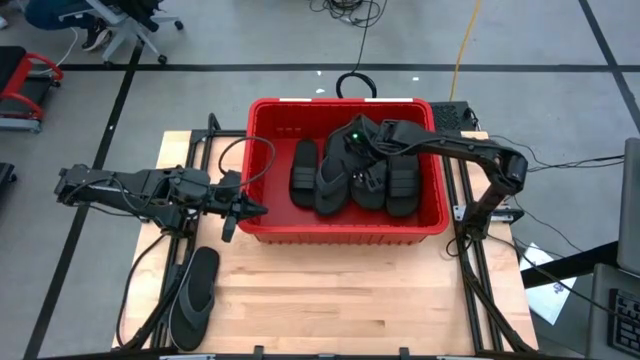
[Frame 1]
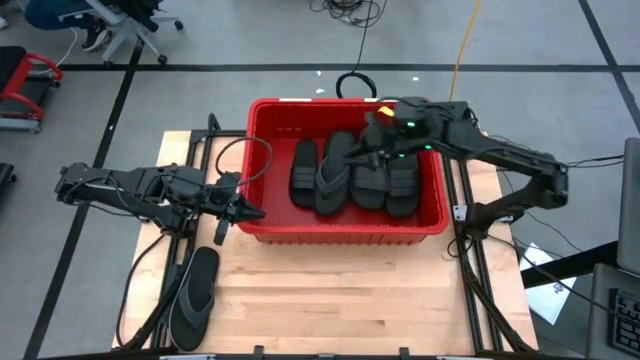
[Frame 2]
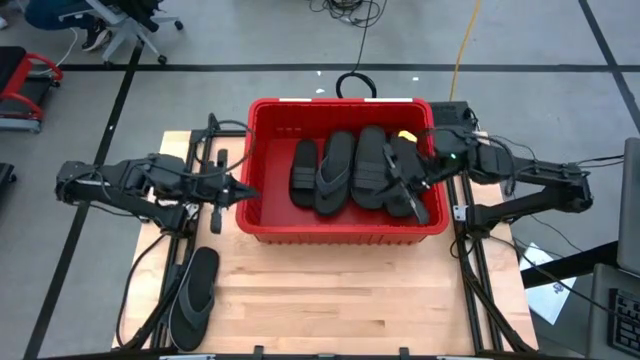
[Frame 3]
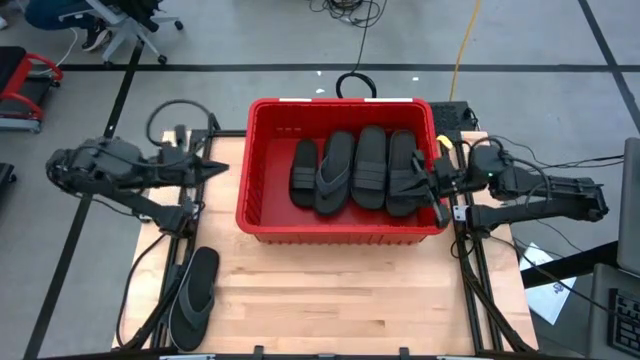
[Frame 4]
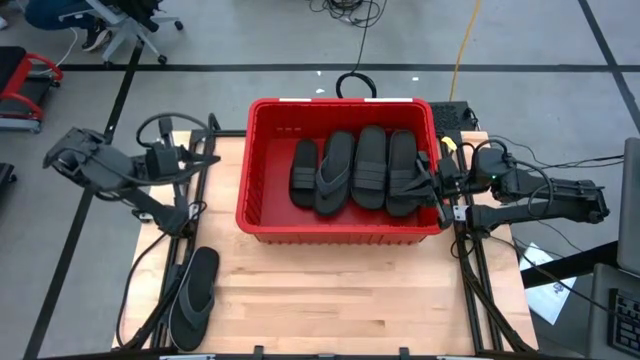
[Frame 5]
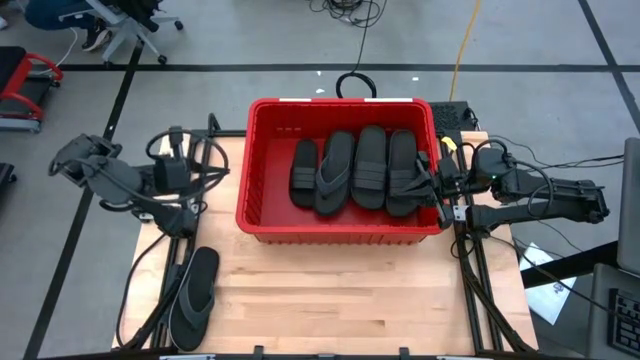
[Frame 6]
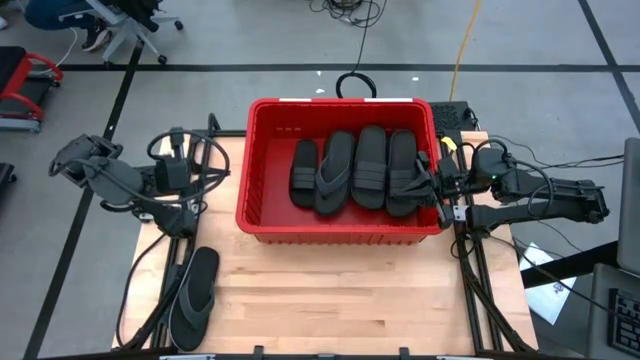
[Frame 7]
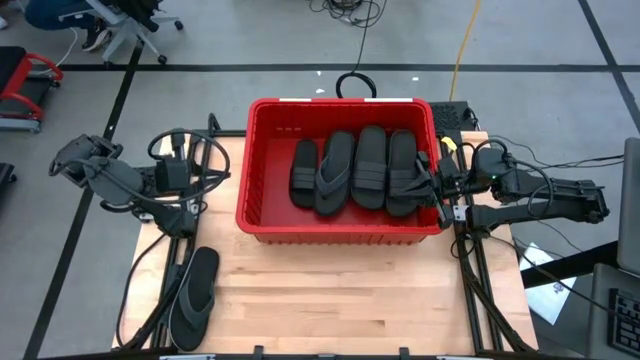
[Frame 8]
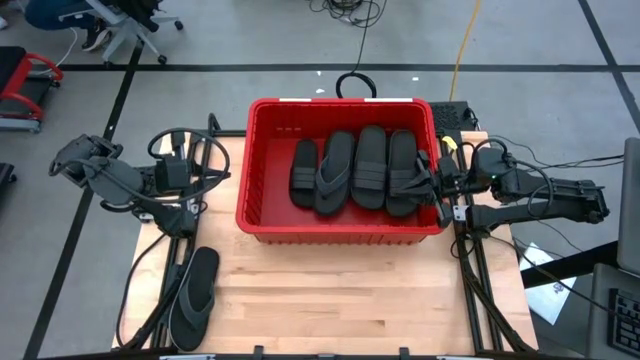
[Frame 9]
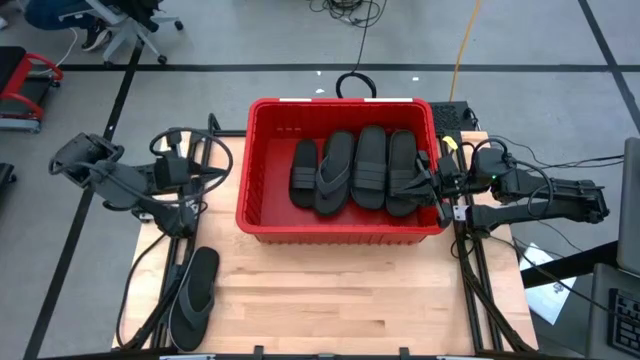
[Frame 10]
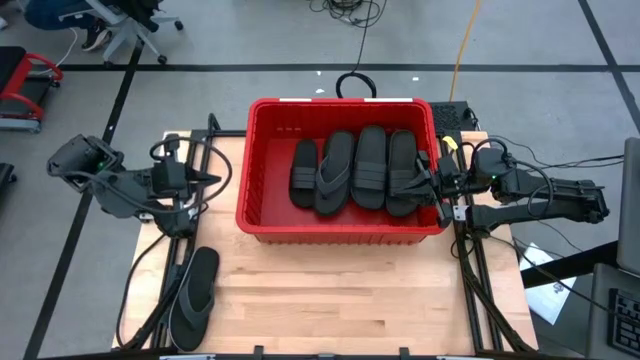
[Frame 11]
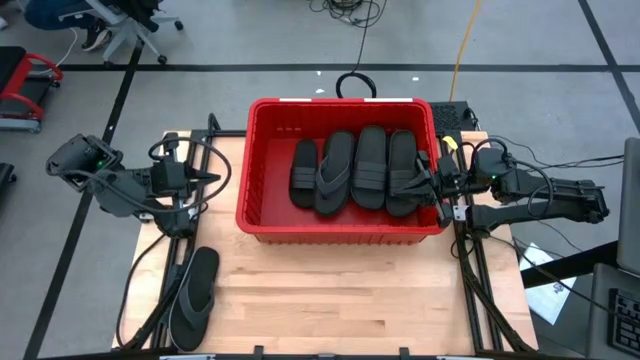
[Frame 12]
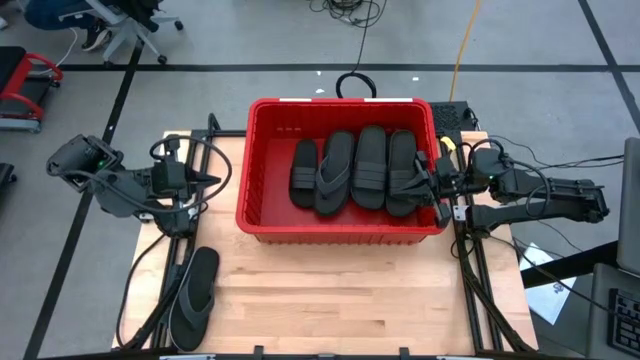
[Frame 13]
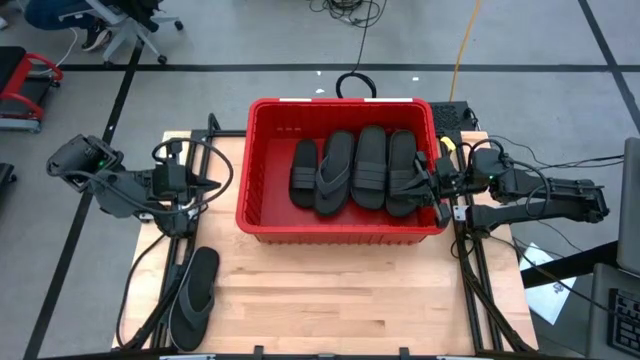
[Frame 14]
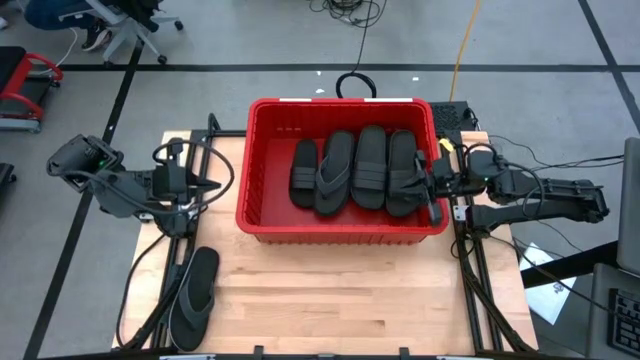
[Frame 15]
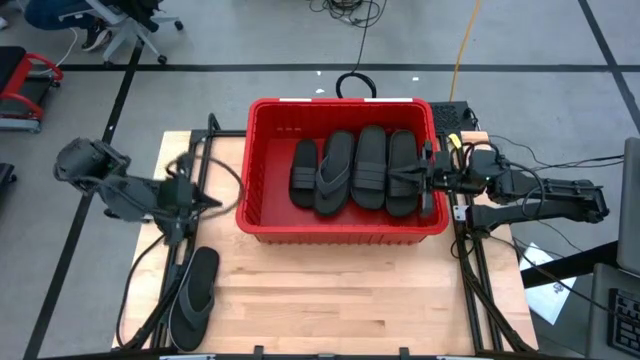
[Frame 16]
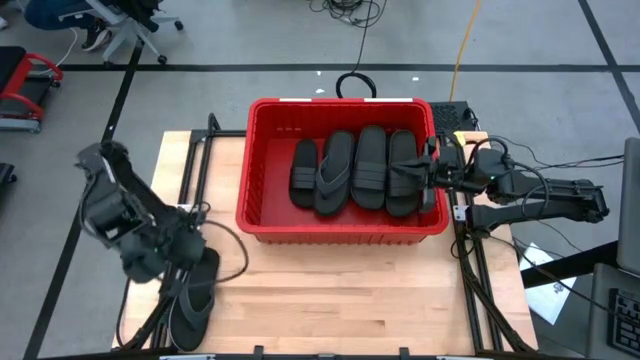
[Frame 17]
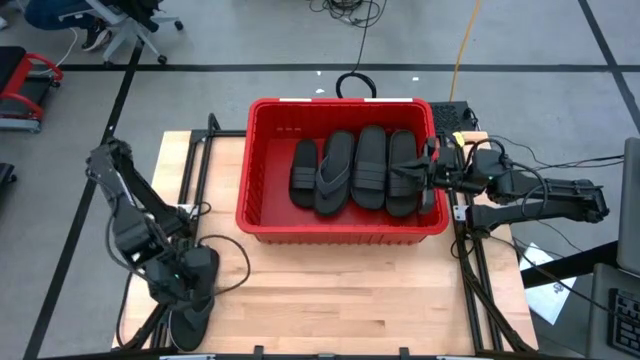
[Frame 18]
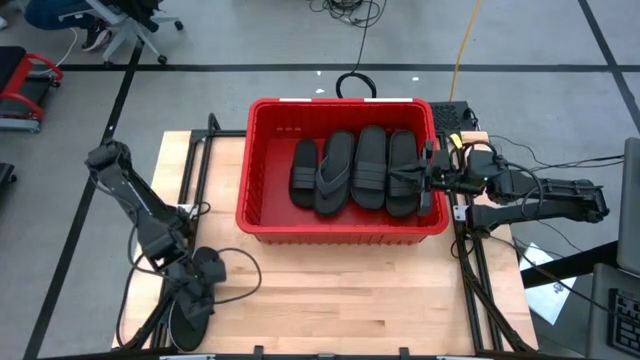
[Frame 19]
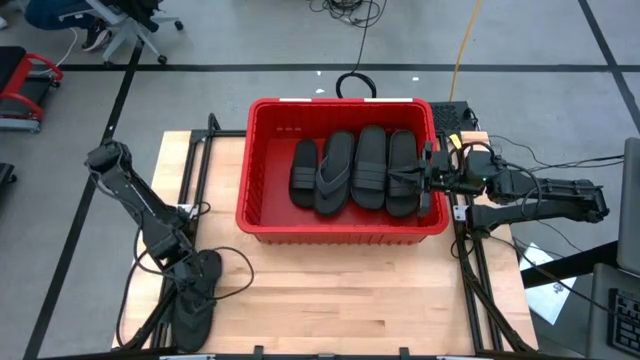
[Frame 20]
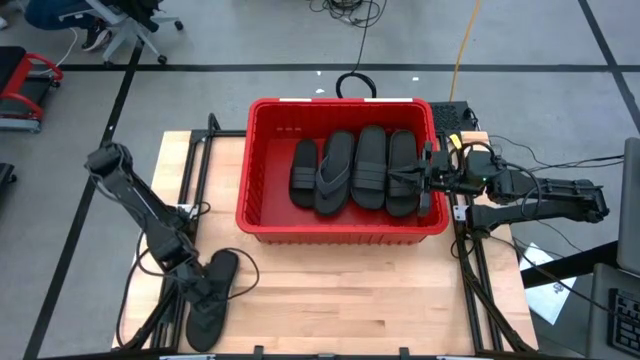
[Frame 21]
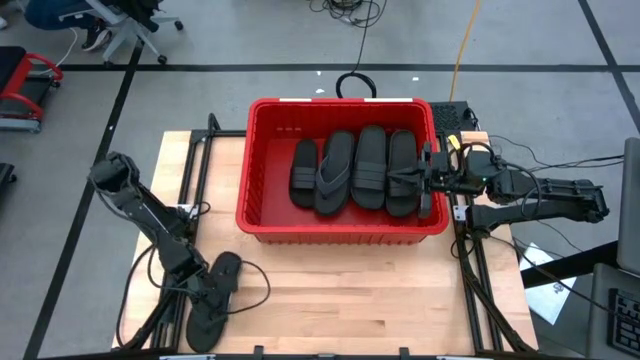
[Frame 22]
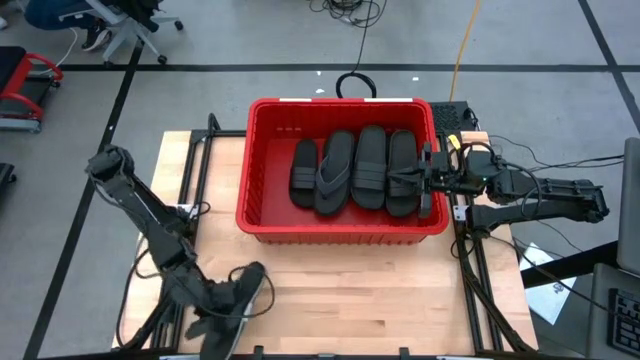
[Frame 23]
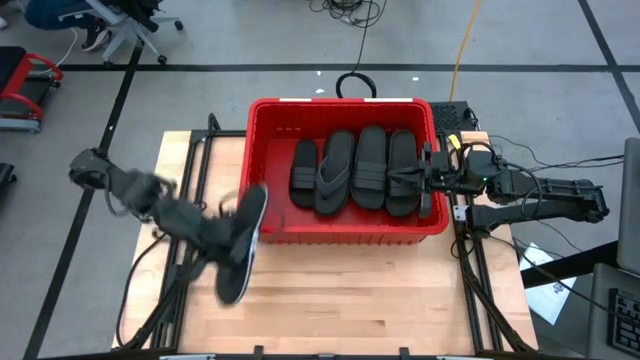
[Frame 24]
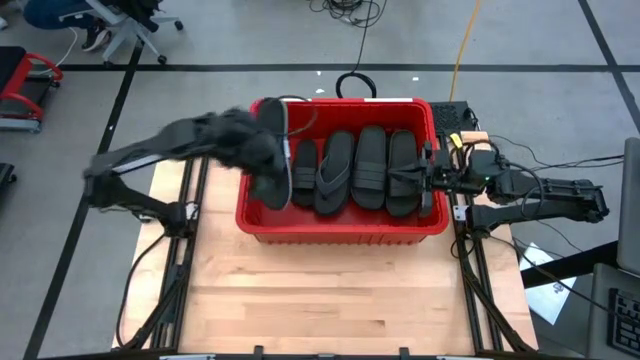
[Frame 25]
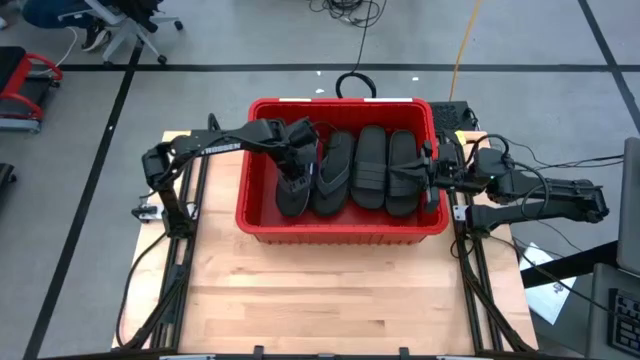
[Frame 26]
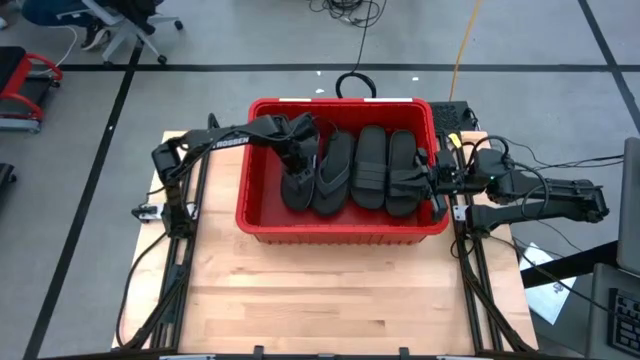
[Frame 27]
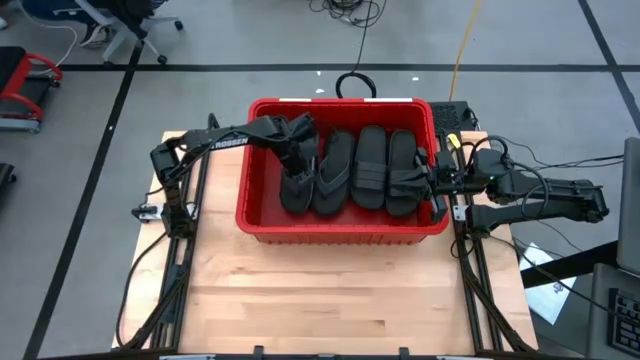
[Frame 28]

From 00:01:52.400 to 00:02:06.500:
Task: Pick and place slides into bin
Put the black slipper into the red bin

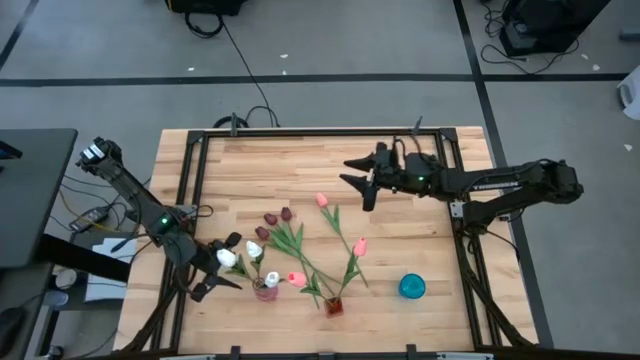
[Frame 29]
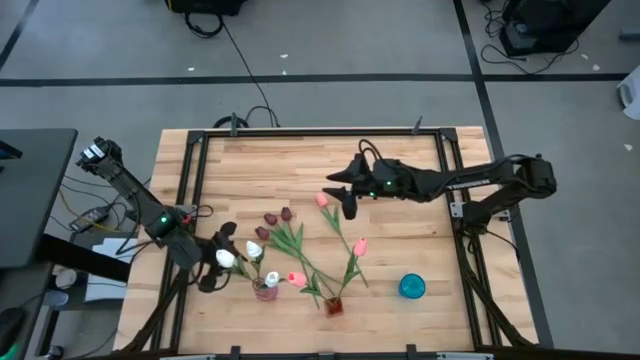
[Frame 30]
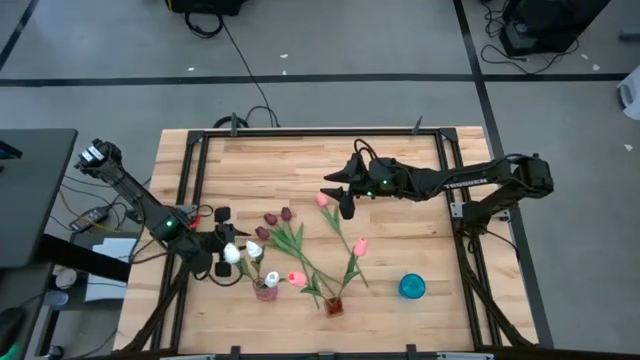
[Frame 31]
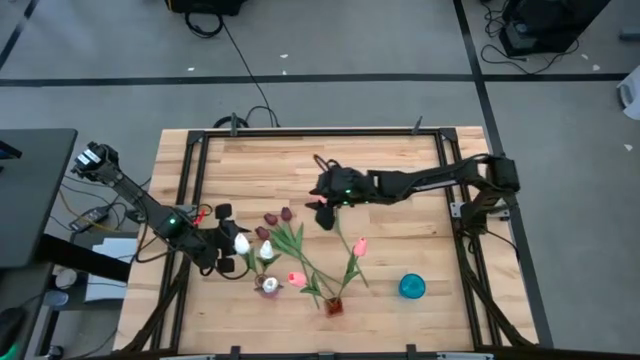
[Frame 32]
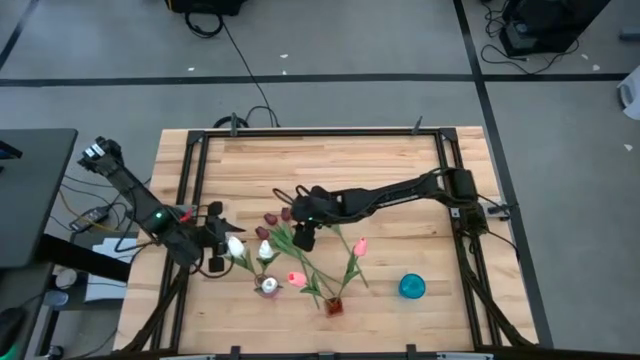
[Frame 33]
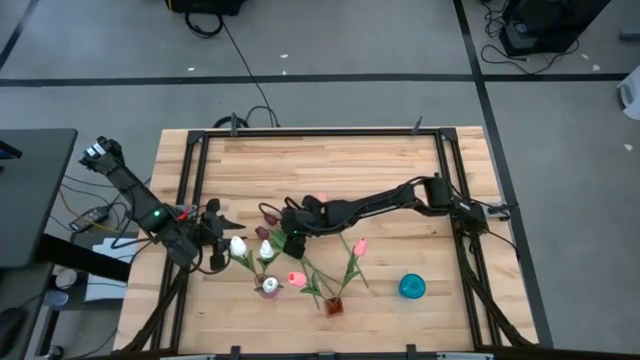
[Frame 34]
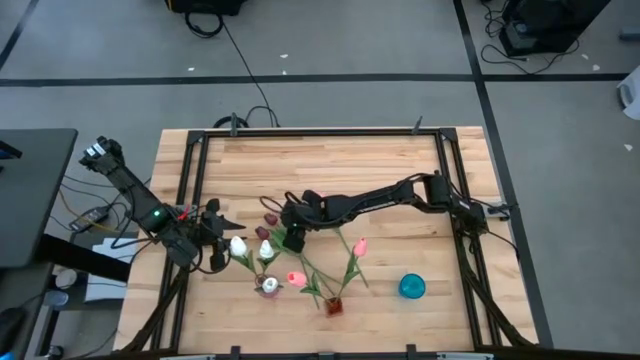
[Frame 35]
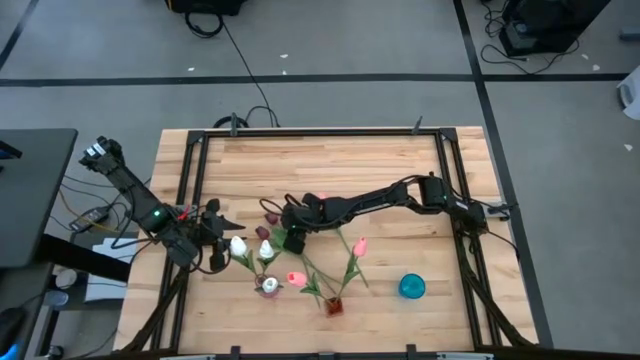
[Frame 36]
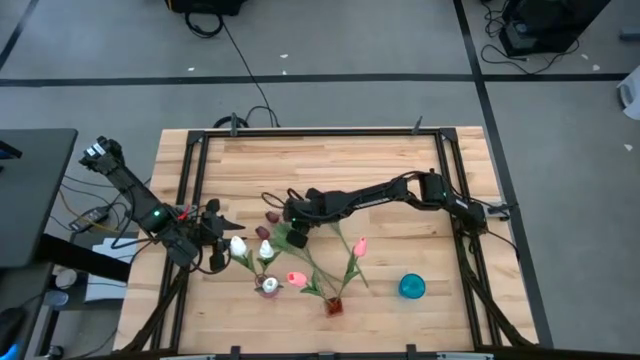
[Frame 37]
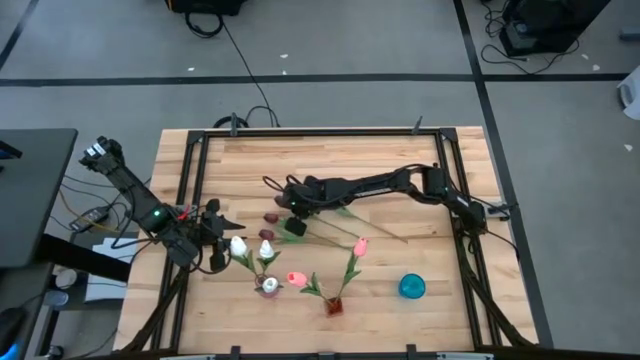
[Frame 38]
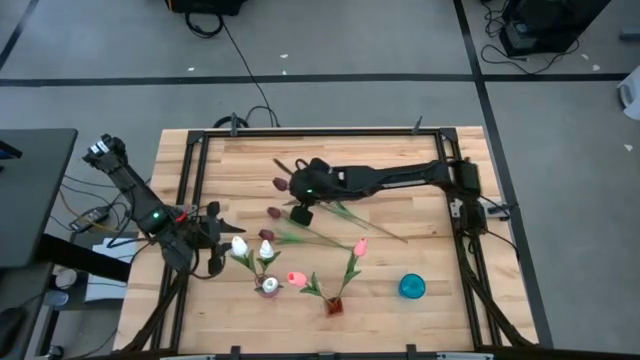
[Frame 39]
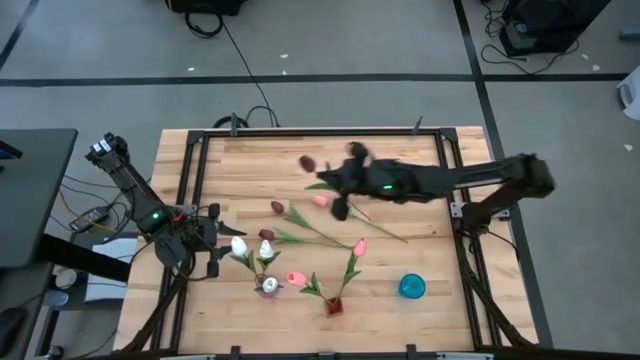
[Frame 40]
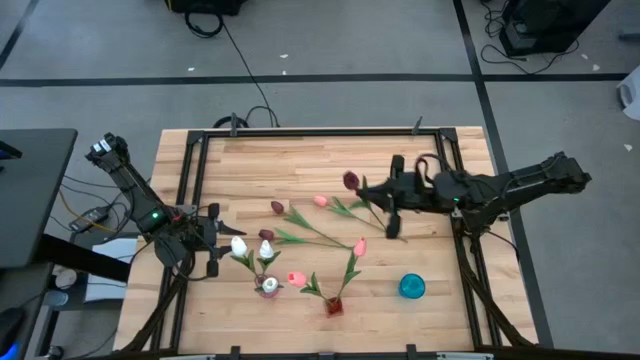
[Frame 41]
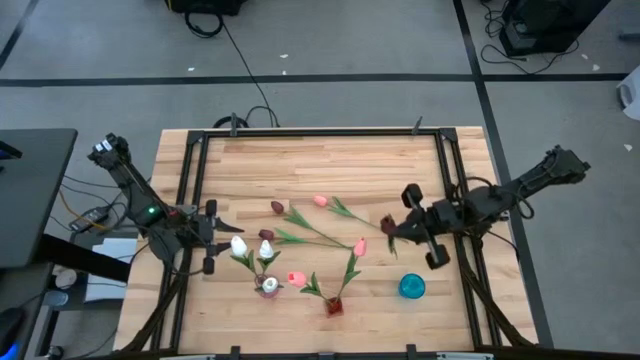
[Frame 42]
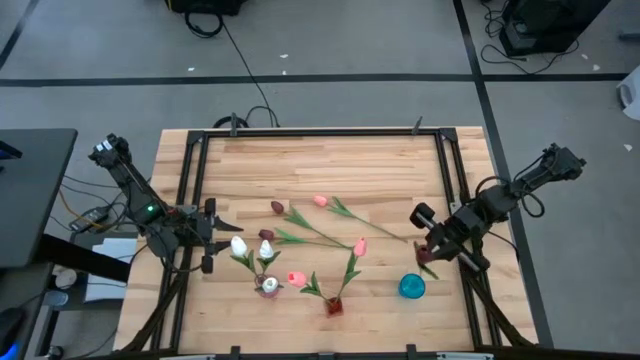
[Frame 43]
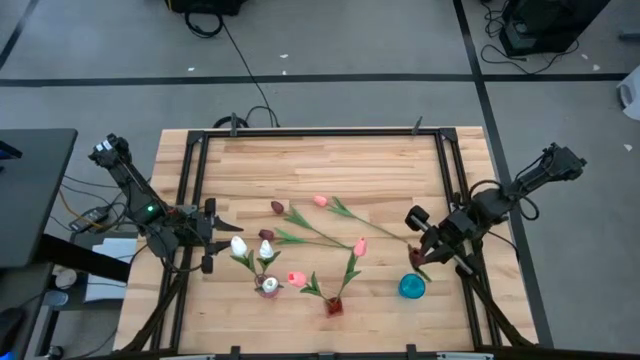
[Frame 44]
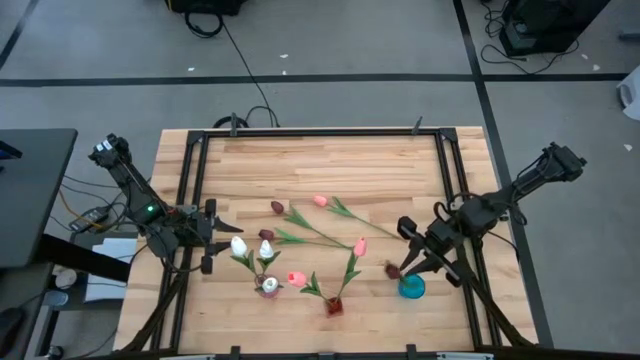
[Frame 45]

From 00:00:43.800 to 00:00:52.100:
Task: Sort flowers into vase by color
Put the right red flower into the blue vase
